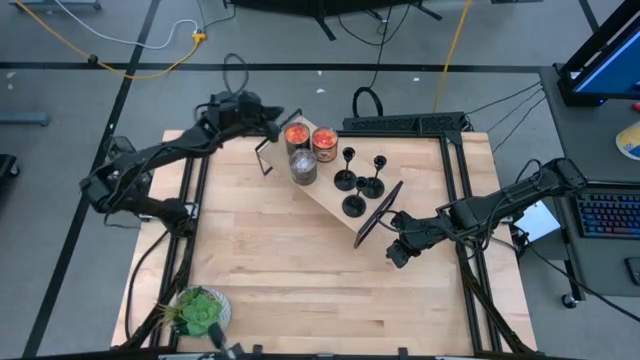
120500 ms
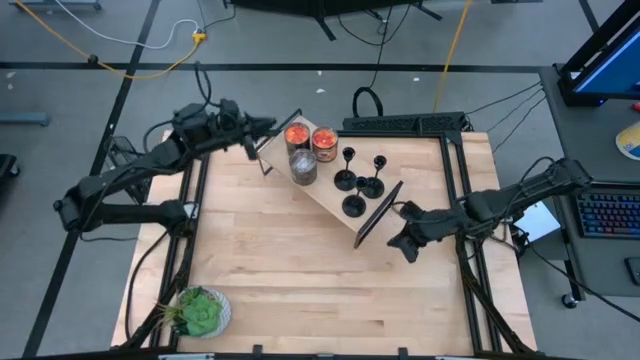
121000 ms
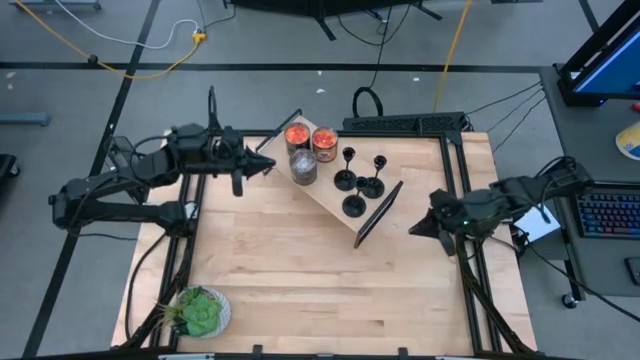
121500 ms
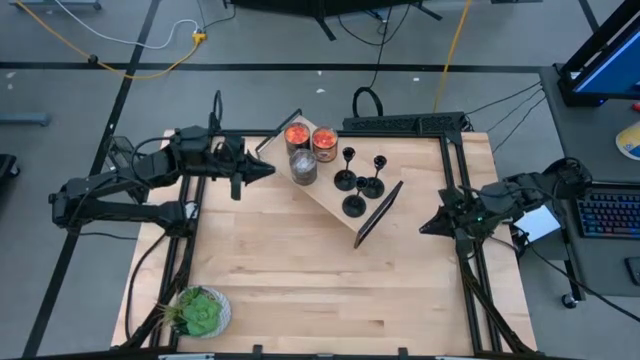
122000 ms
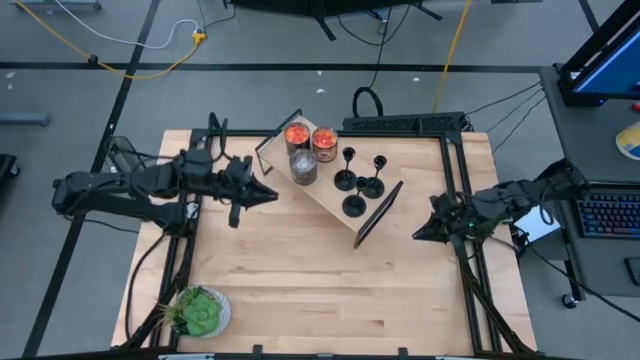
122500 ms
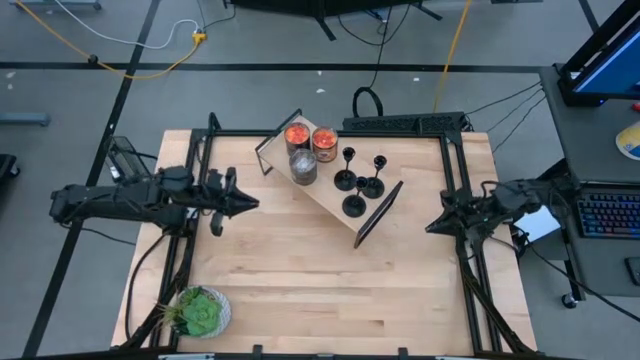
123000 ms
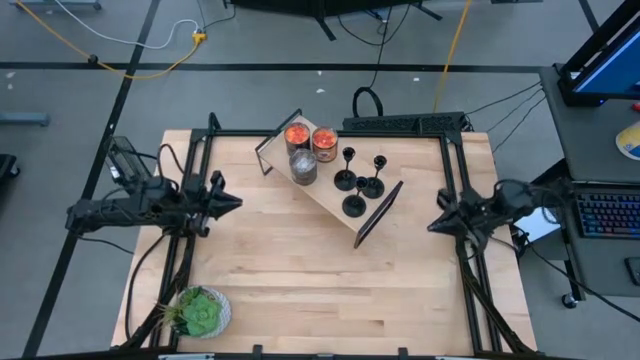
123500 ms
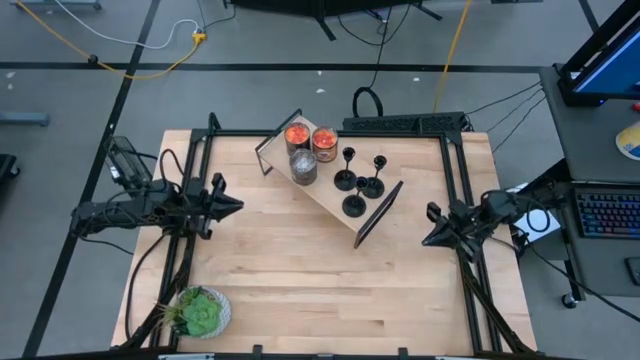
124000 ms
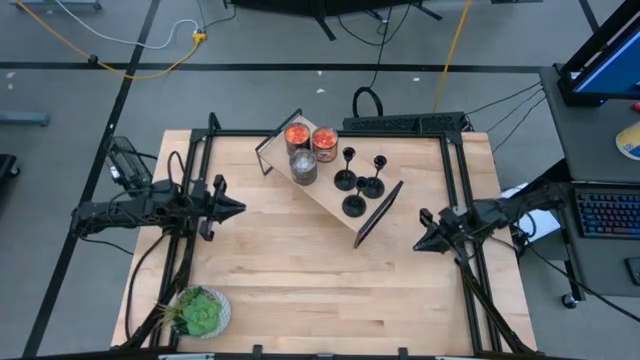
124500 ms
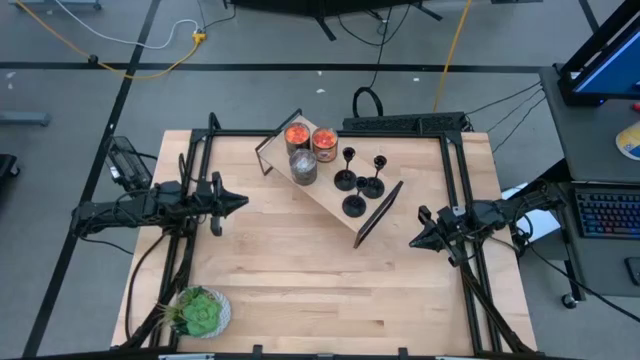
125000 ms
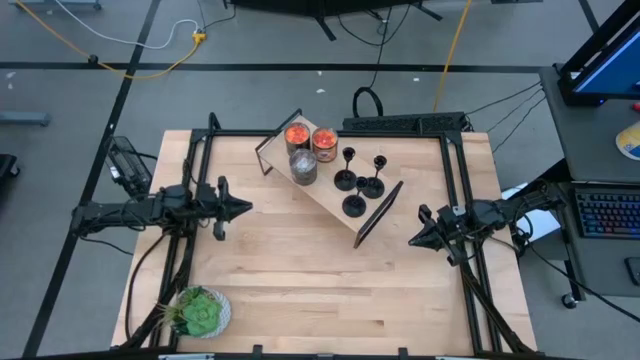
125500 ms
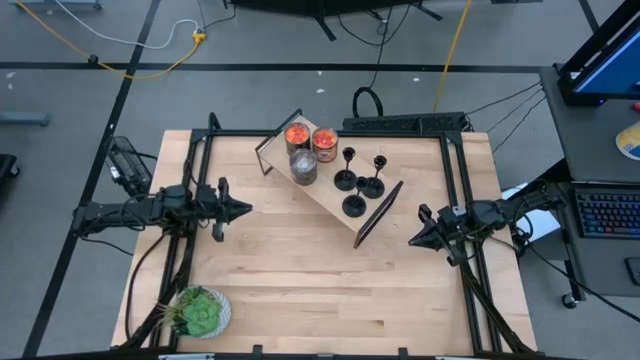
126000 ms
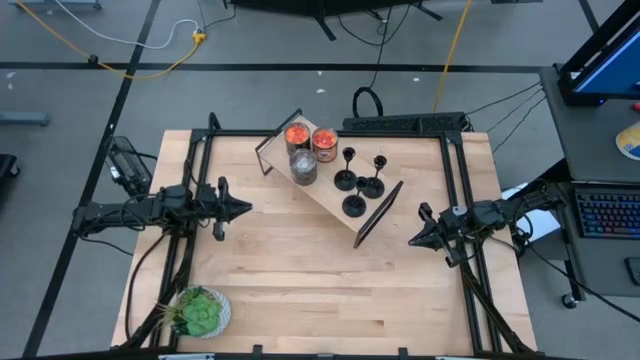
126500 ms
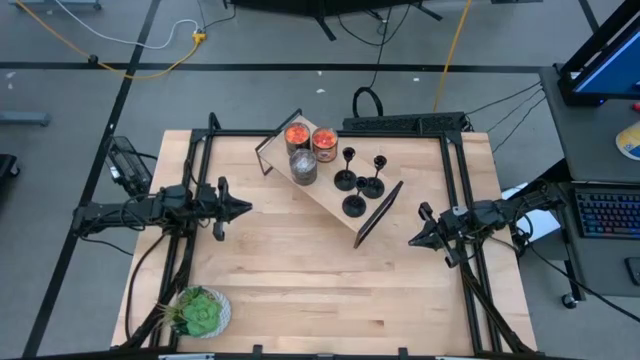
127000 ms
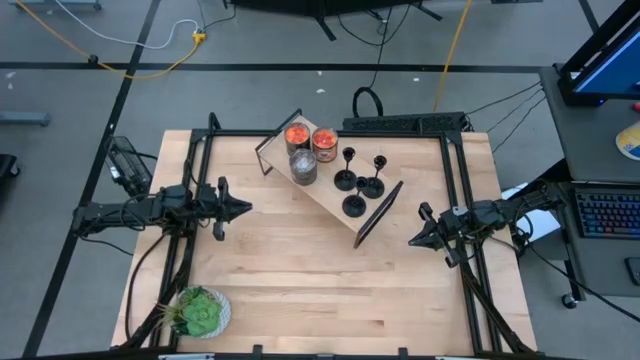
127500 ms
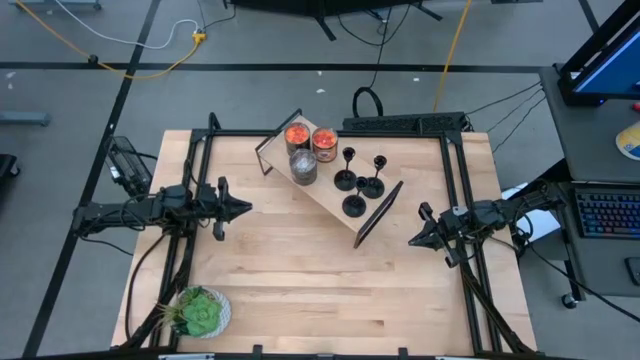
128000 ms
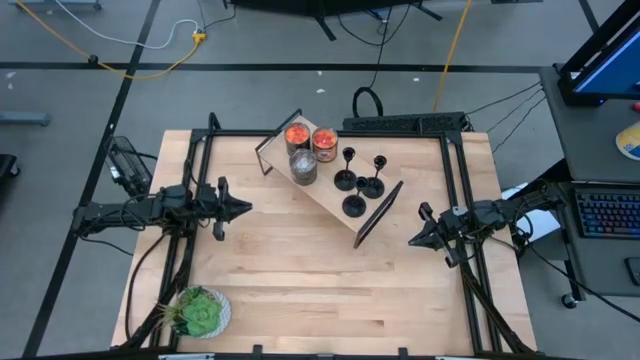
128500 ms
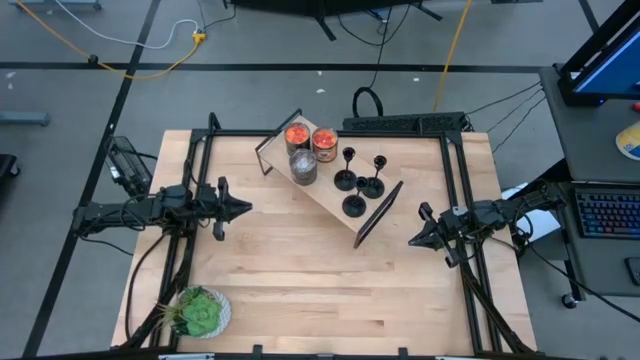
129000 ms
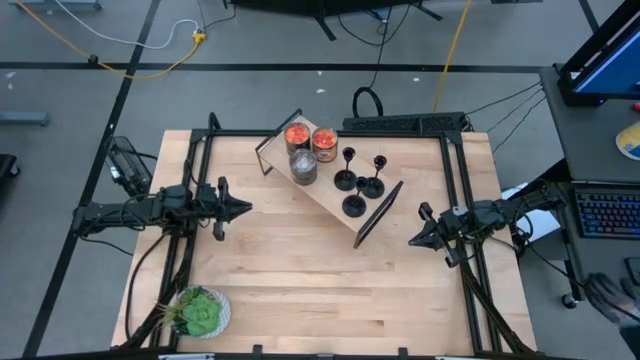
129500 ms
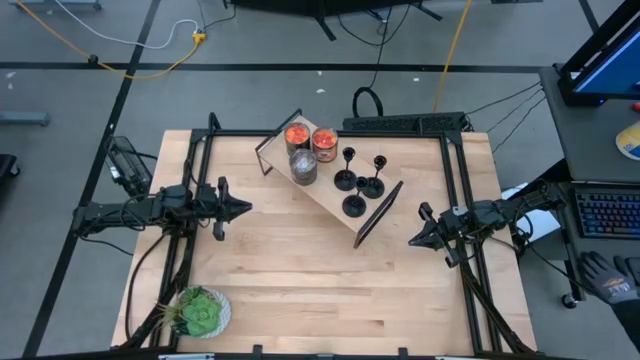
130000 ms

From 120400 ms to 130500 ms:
Task: Pick & Place candle stick holders
Return to Home Position

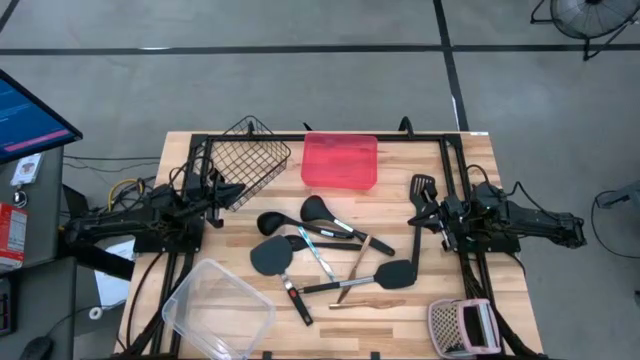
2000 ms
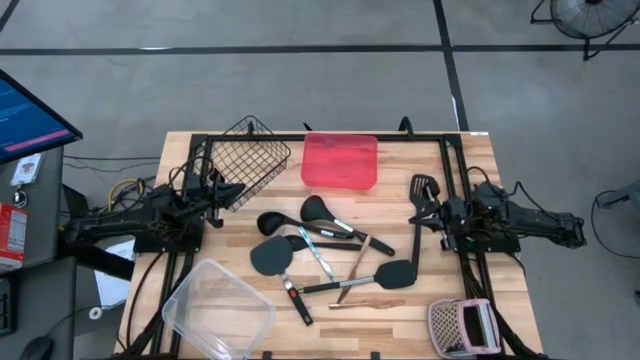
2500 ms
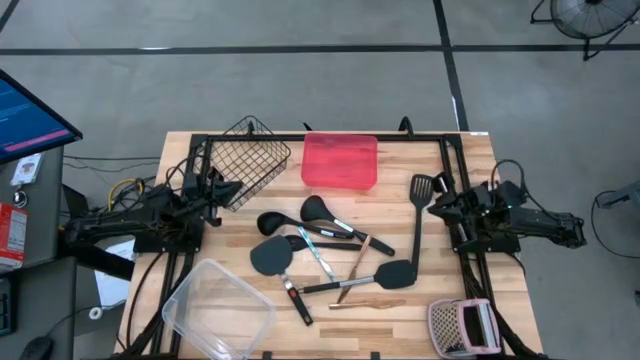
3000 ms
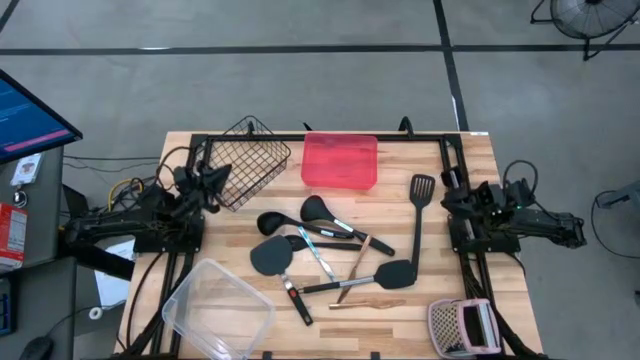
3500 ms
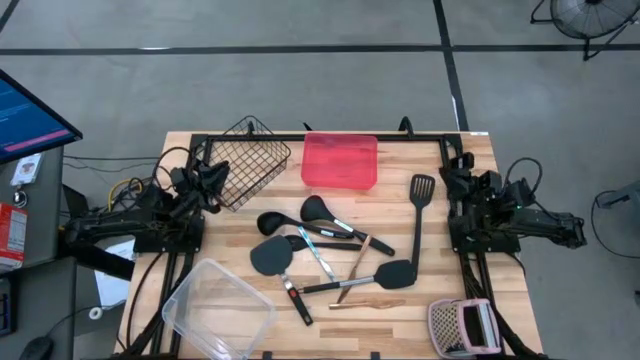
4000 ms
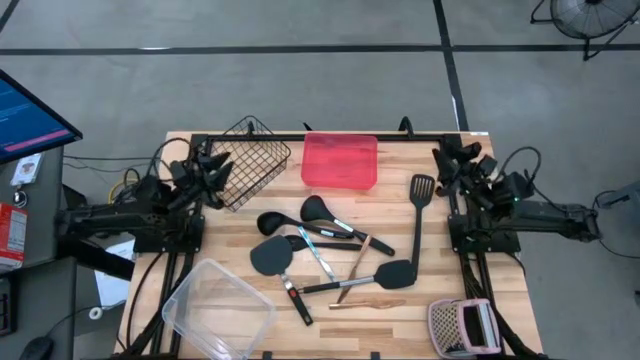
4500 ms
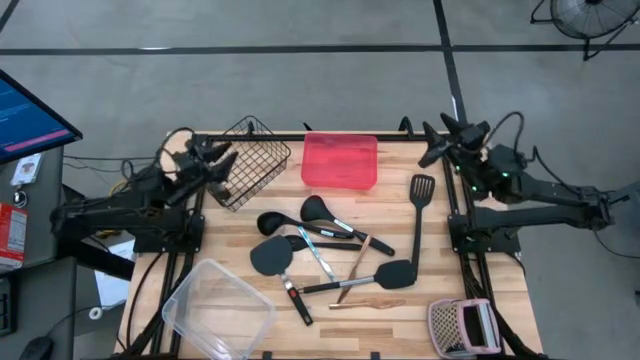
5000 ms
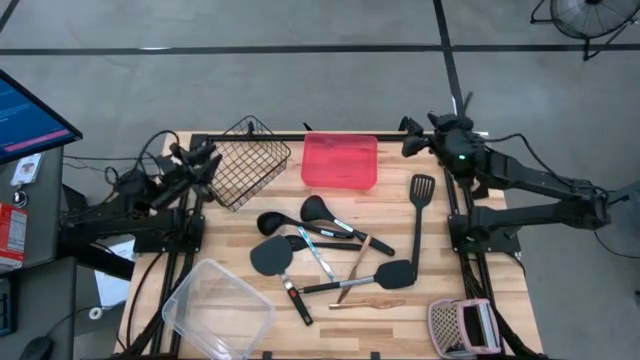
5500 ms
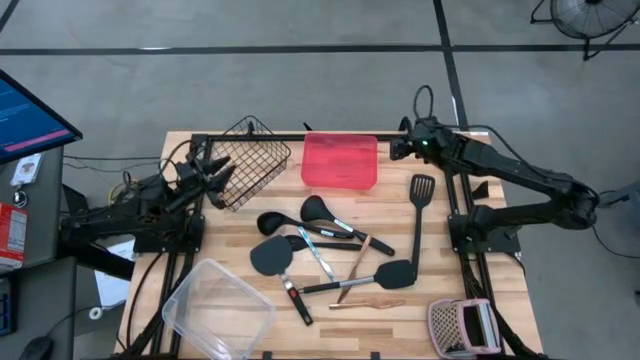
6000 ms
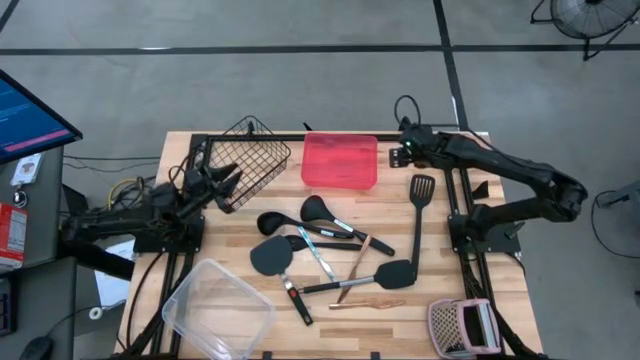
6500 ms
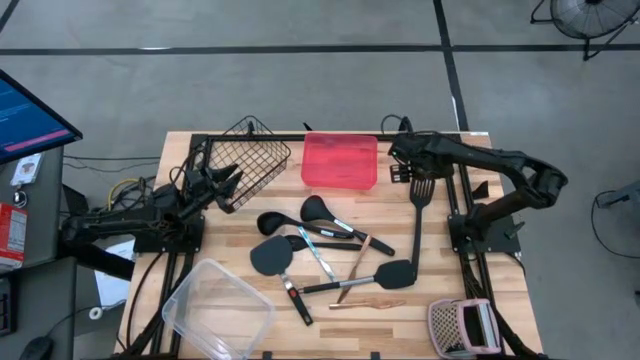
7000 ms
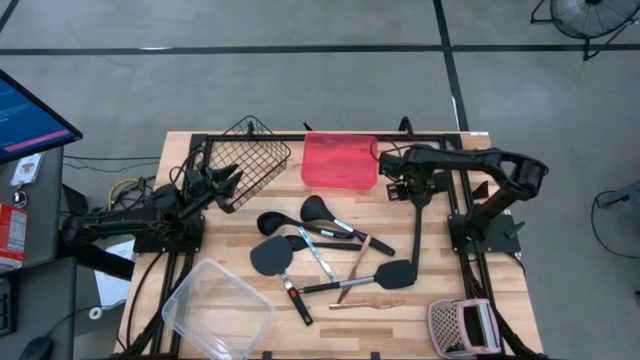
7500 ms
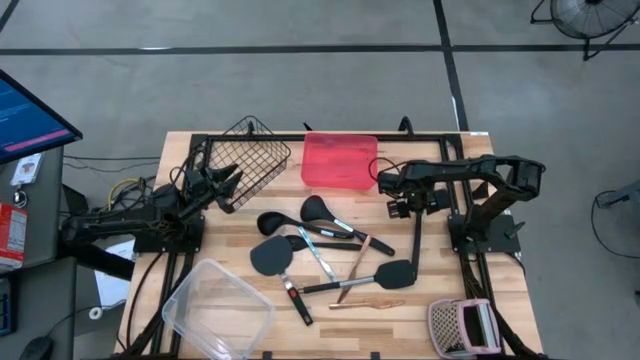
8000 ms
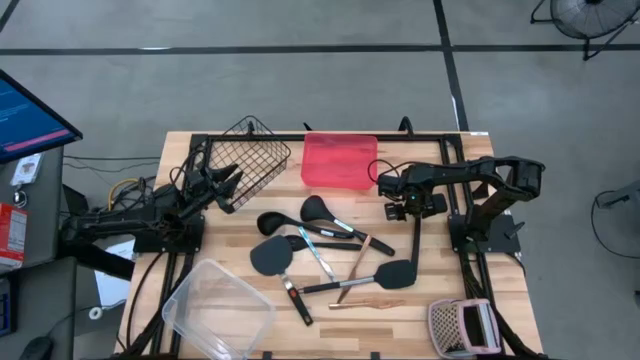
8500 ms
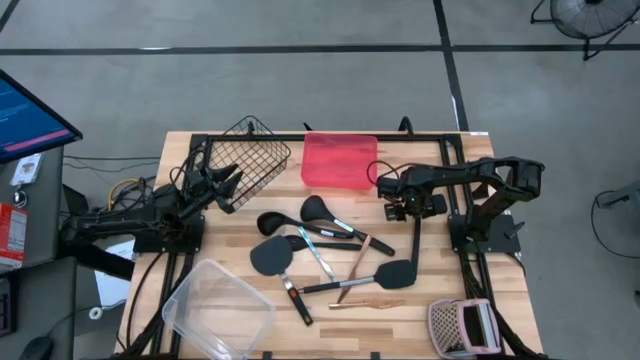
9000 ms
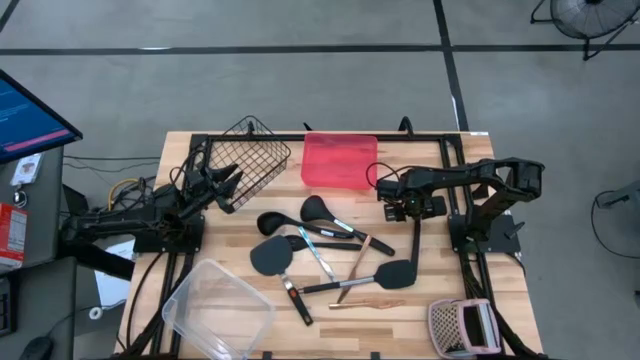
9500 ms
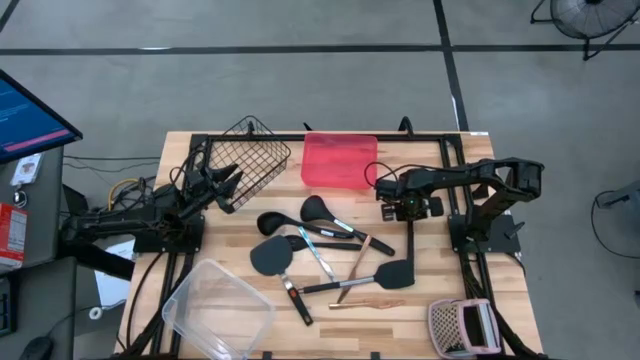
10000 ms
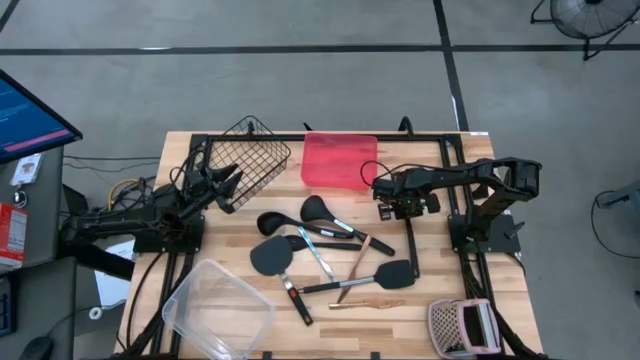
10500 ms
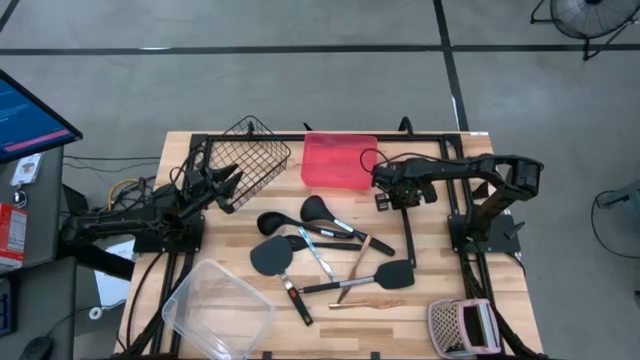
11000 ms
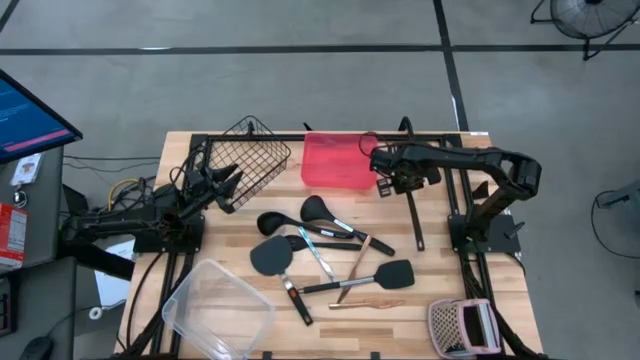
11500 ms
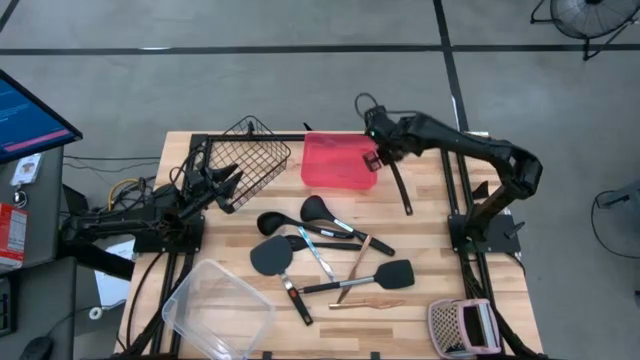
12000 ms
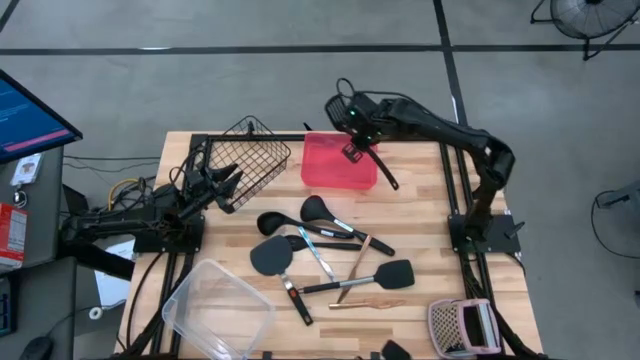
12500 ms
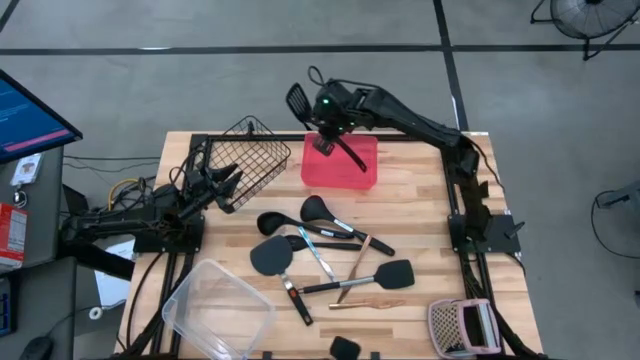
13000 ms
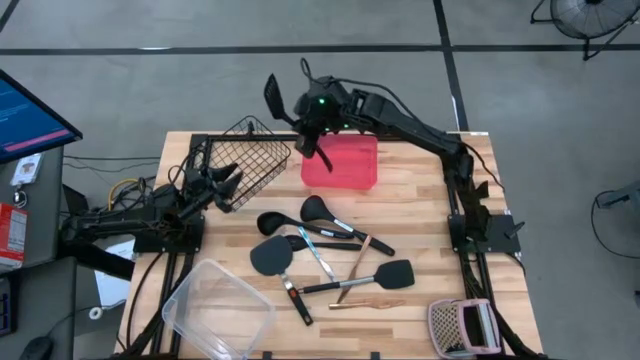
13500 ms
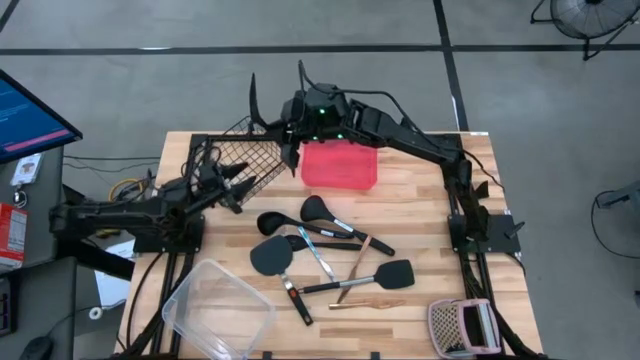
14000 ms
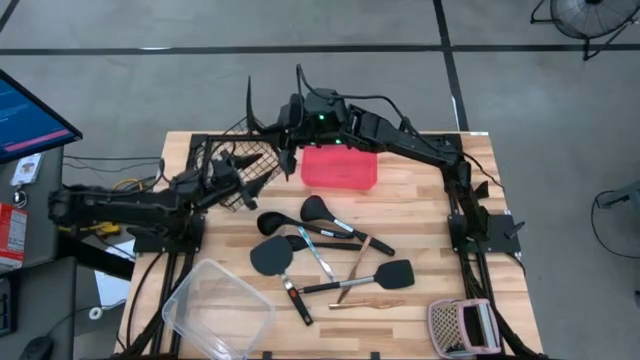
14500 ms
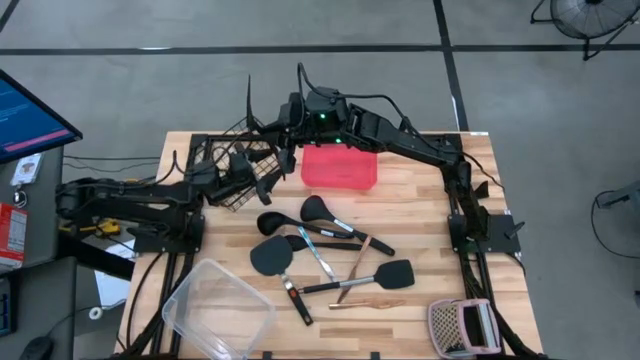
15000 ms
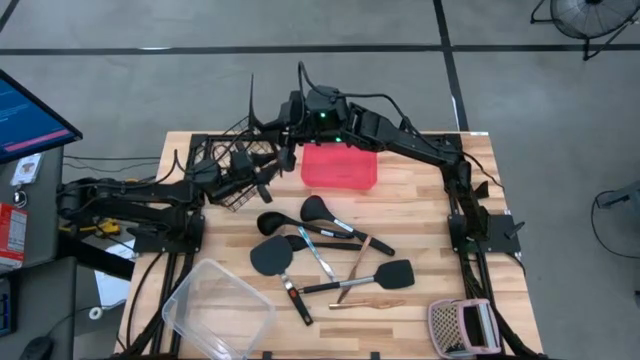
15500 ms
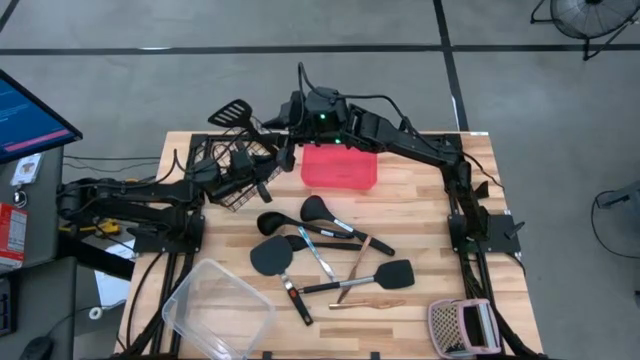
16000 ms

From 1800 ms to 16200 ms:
Task: Pick & Place Kitchen Items
Put the slotted spatula into the wire basket
